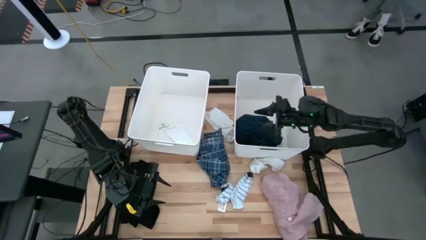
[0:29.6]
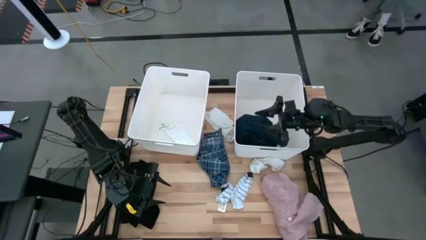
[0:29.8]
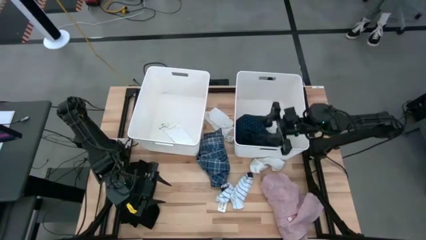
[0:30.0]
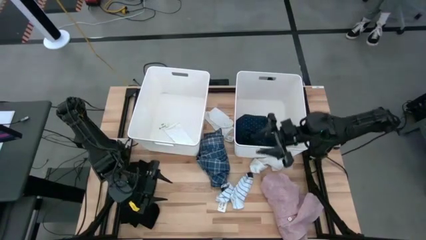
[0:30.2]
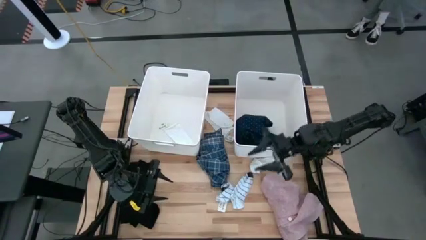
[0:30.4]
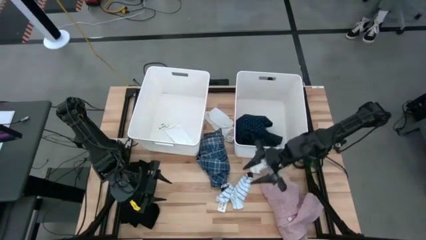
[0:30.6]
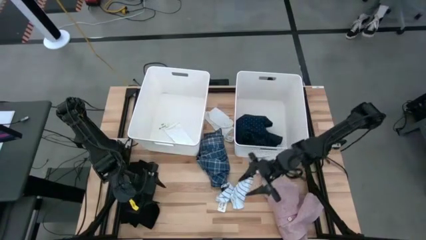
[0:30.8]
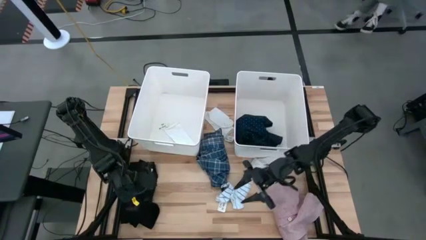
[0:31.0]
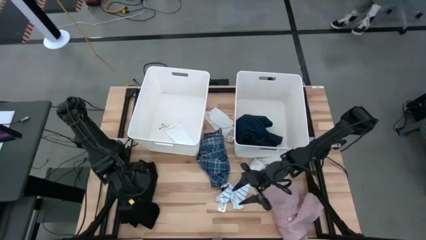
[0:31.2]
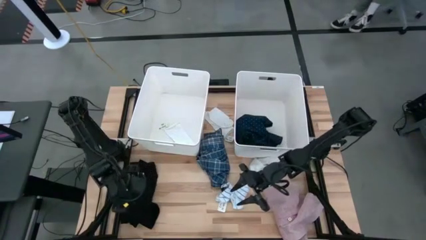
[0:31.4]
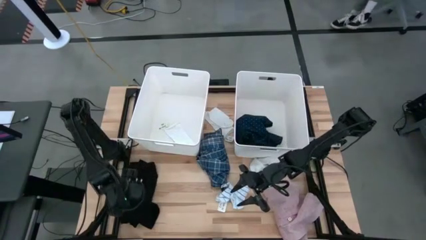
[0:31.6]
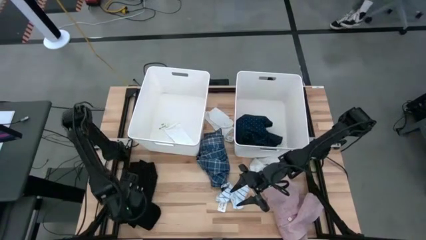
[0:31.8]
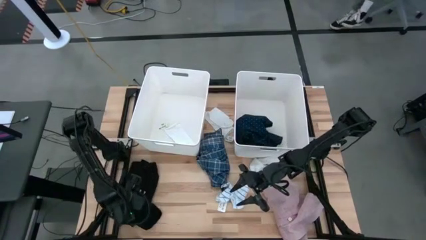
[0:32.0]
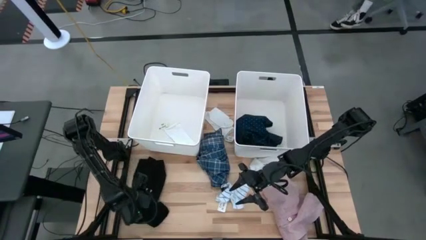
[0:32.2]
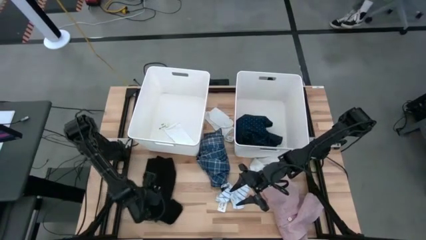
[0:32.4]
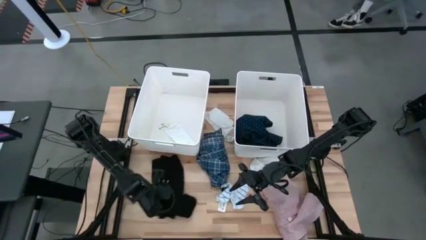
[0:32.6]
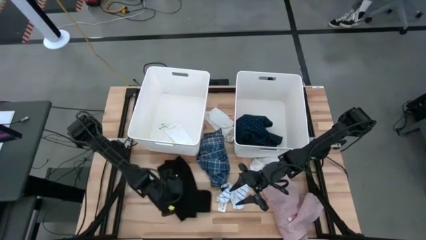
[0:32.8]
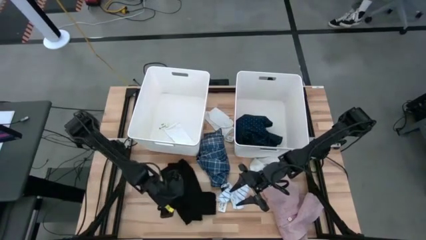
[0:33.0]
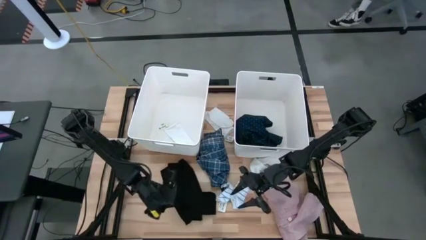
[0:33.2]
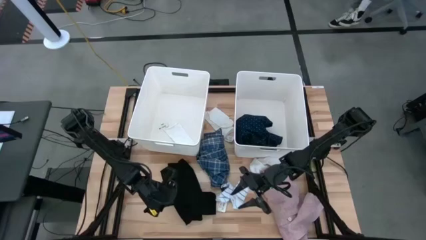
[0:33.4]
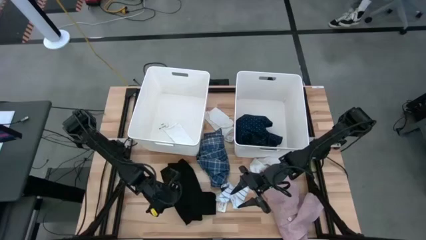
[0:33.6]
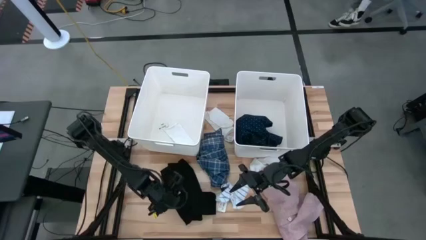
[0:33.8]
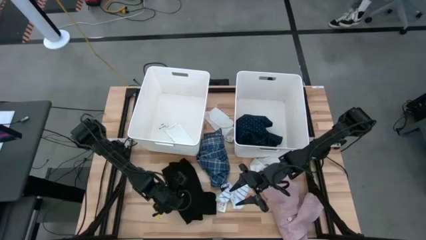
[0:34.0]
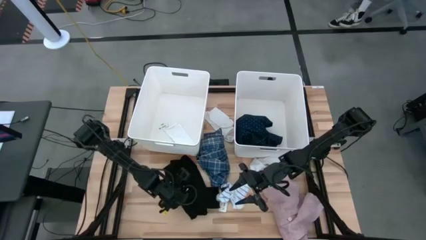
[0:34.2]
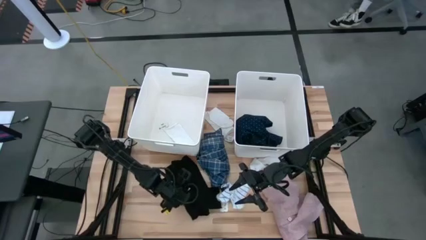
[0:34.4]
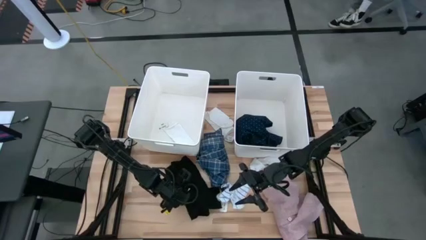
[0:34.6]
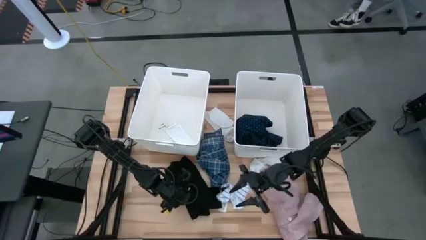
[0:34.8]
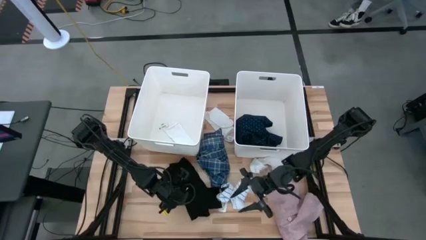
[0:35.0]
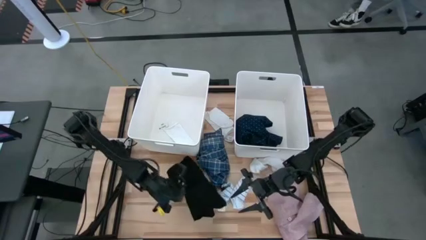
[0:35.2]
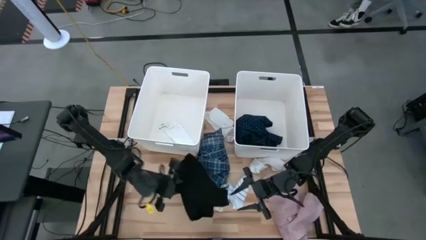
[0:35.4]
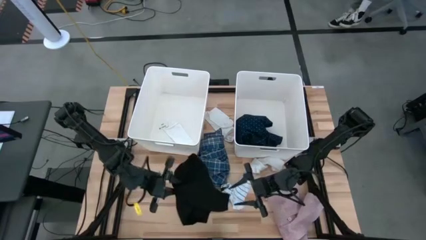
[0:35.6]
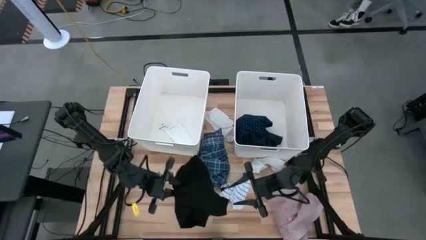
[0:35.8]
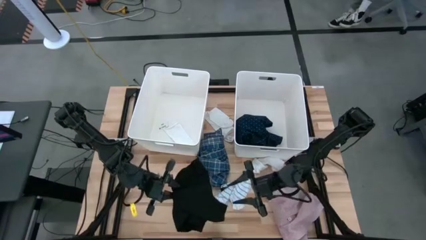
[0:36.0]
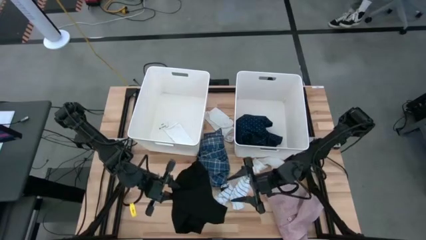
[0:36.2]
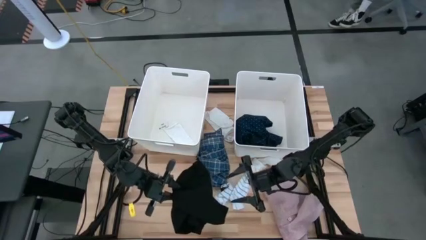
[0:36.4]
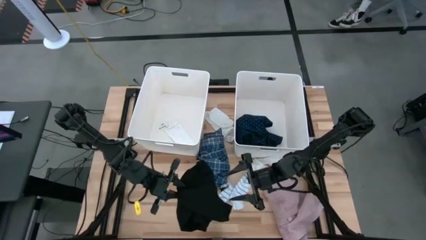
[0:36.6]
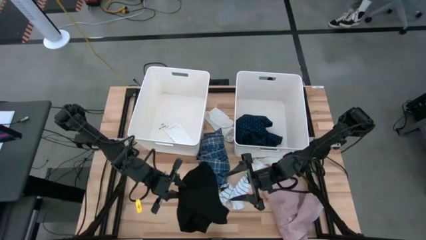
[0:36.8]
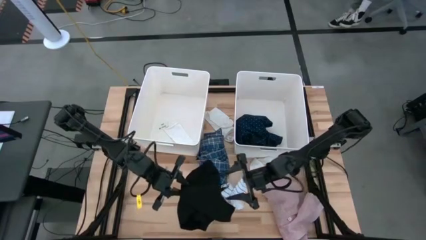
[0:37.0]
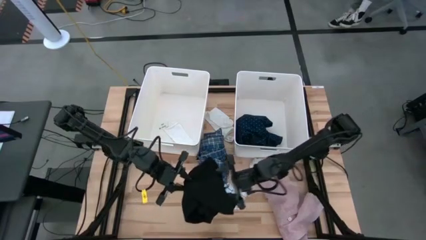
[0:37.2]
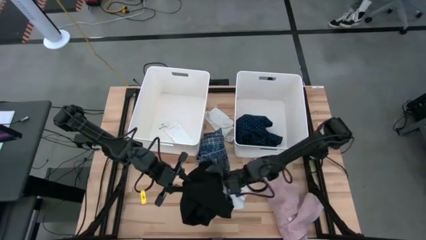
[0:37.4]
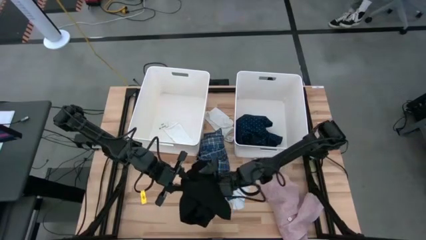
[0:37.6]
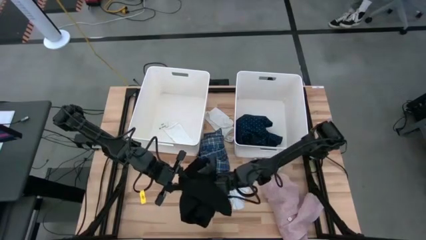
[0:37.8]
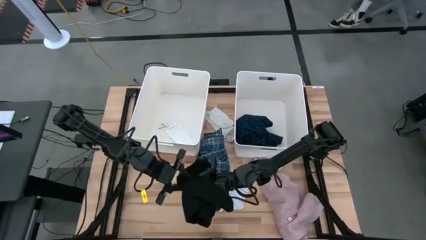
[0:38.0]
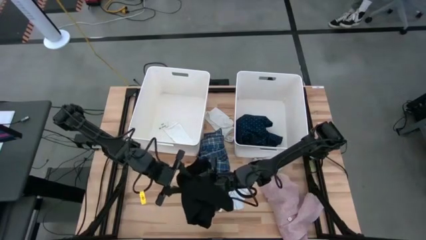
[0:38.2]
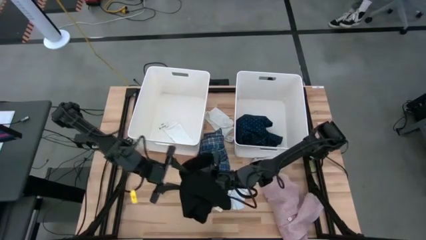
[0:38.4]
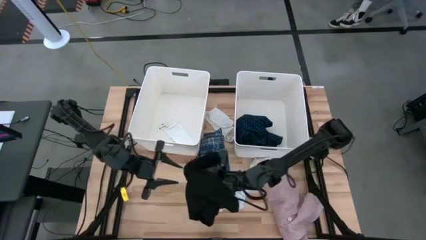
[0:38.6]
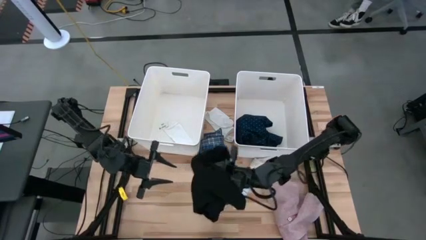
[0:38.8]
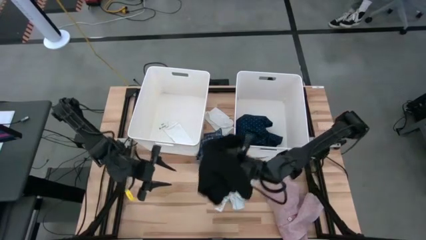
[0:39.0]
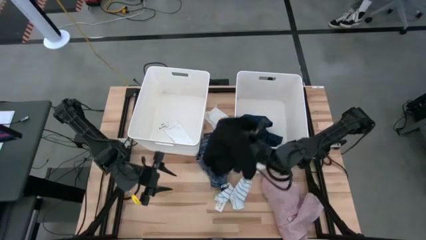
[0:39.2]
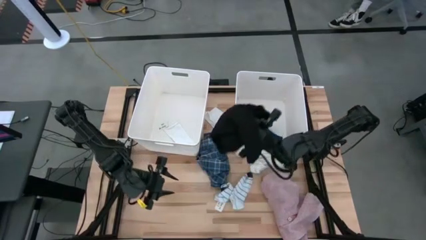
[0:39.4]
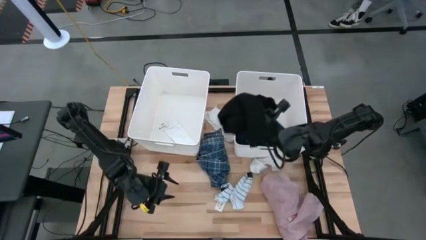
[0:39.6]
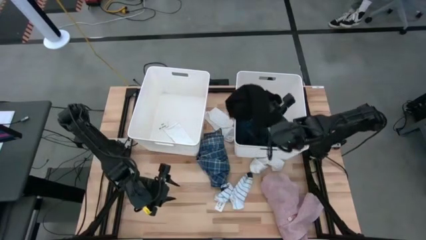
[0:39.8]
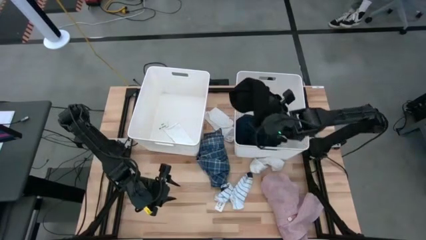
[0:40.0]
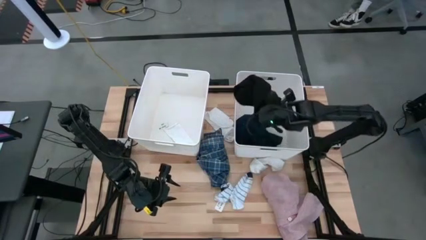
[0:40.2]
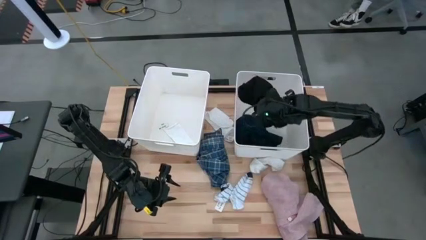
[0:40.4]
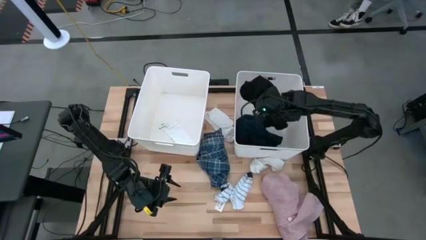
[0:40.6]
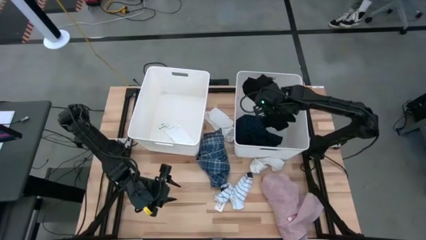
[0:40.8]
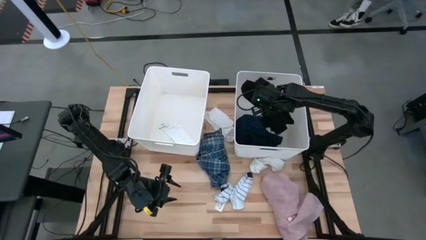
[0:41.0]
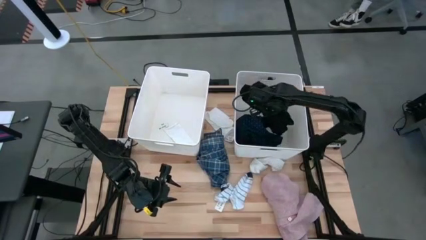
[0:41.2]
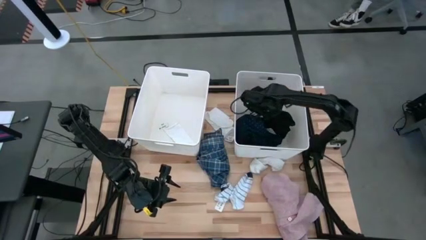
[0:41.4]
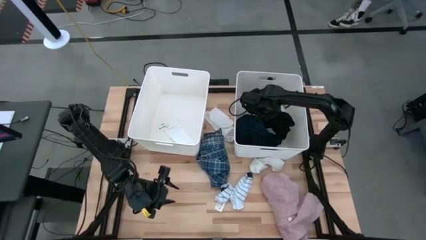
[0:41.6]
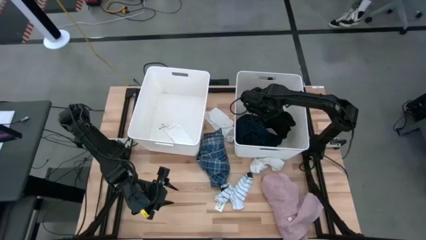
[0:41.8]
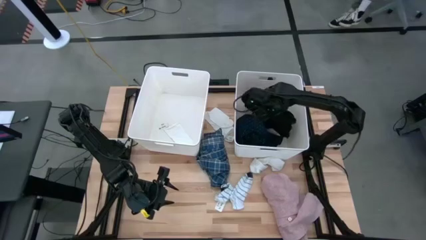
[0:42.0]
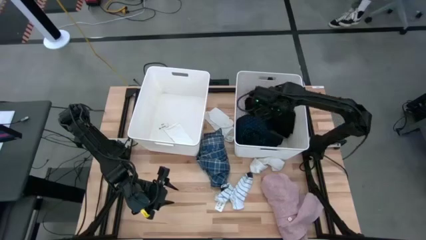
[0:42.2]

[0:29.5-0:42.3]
Task: Sort clothes
Put the black pants into the right white laundry bin
